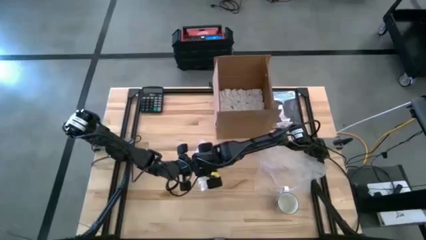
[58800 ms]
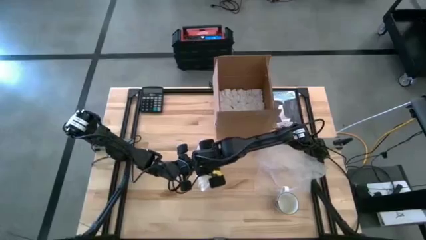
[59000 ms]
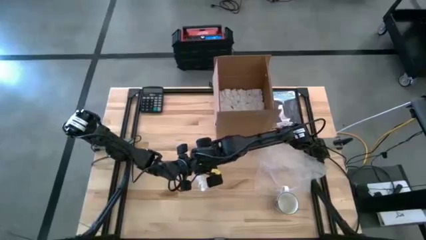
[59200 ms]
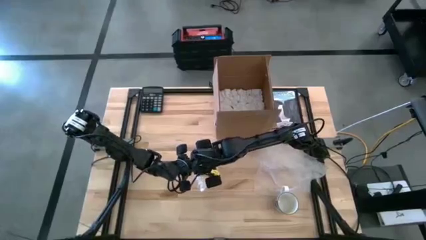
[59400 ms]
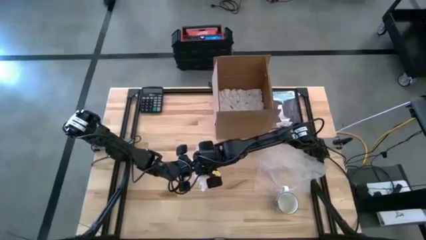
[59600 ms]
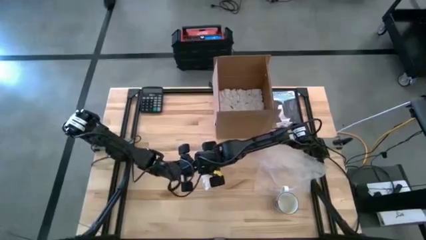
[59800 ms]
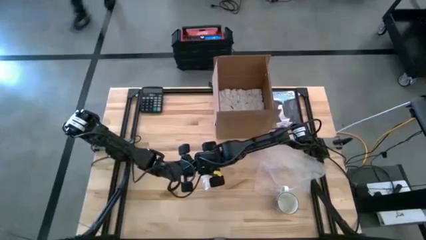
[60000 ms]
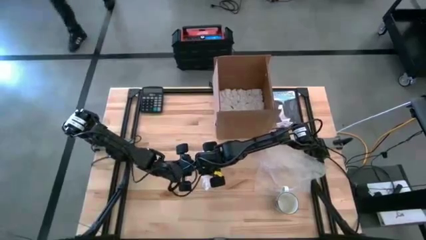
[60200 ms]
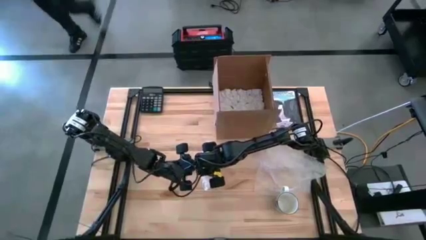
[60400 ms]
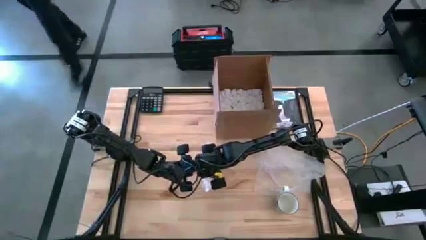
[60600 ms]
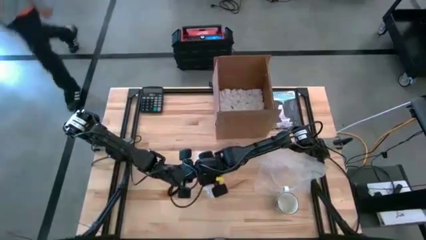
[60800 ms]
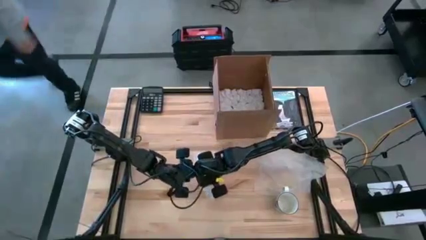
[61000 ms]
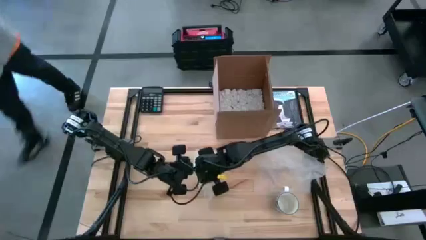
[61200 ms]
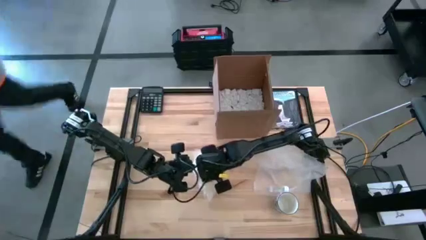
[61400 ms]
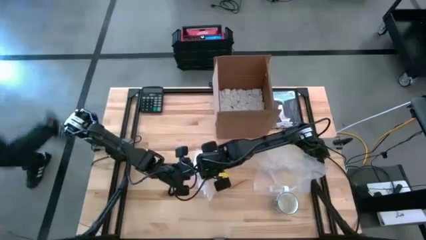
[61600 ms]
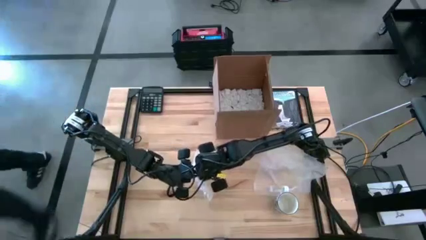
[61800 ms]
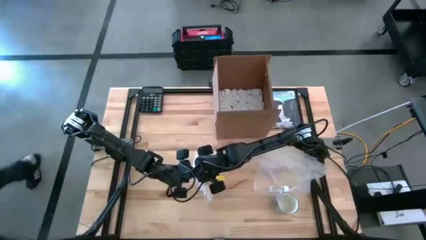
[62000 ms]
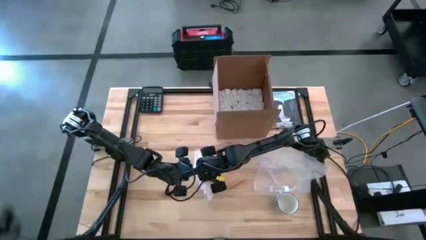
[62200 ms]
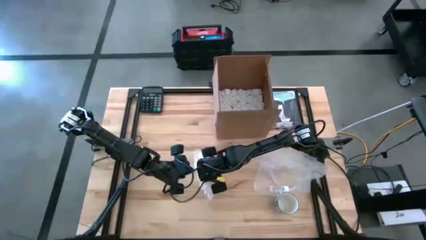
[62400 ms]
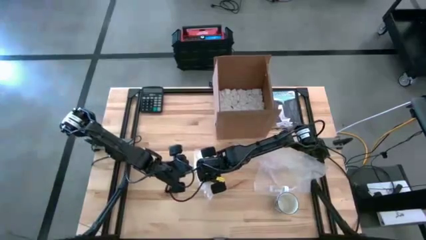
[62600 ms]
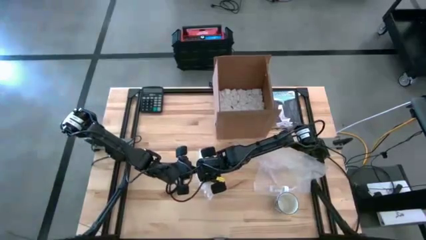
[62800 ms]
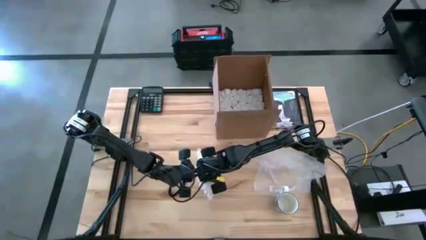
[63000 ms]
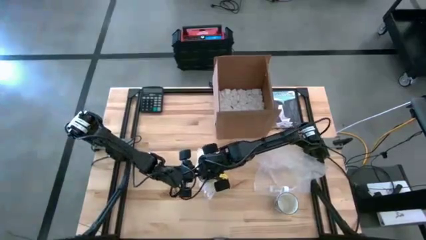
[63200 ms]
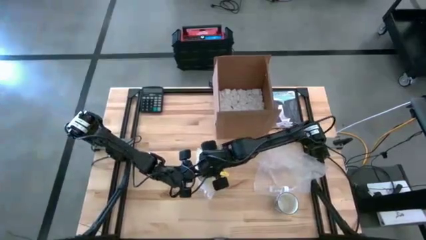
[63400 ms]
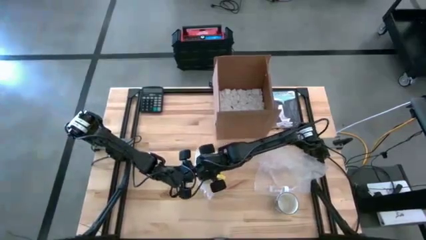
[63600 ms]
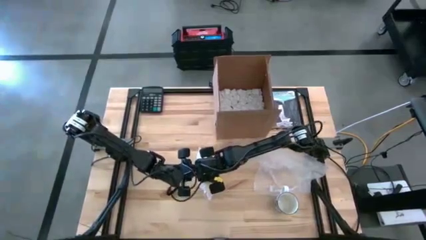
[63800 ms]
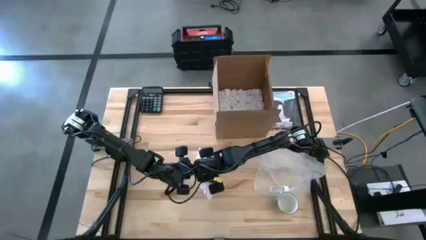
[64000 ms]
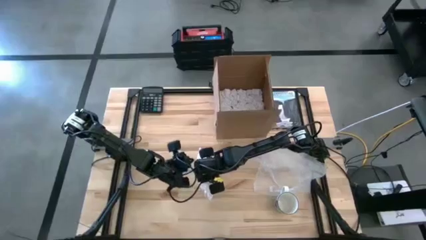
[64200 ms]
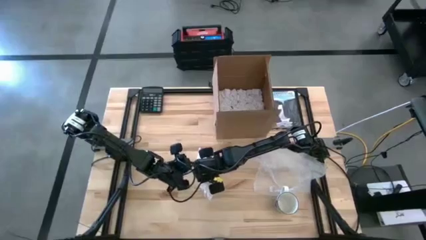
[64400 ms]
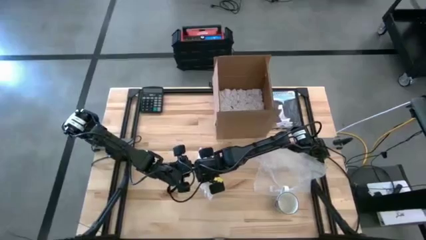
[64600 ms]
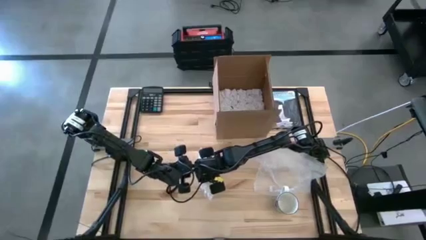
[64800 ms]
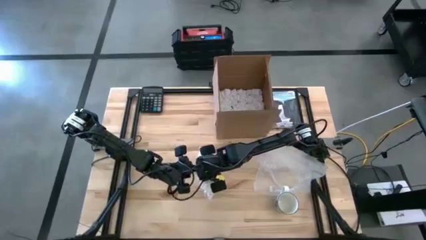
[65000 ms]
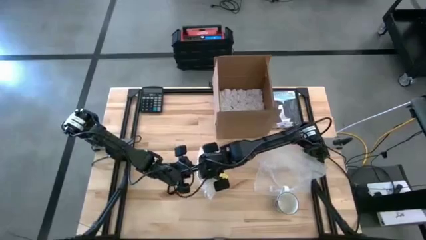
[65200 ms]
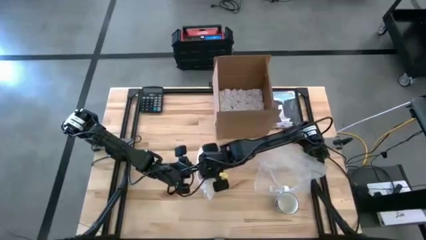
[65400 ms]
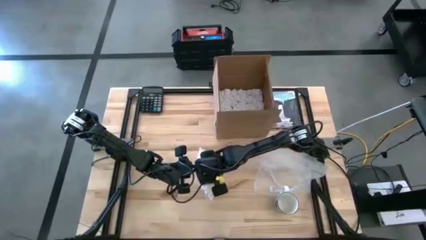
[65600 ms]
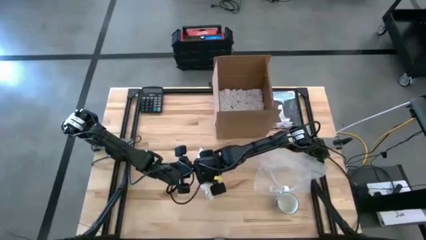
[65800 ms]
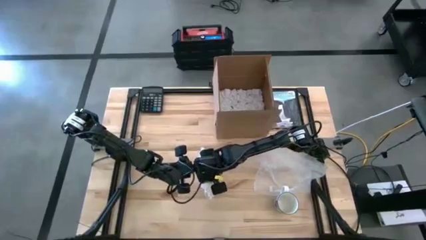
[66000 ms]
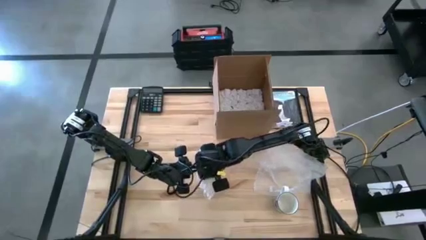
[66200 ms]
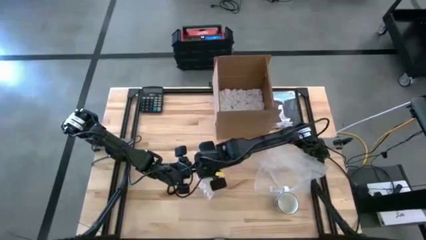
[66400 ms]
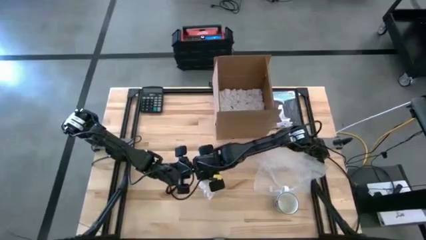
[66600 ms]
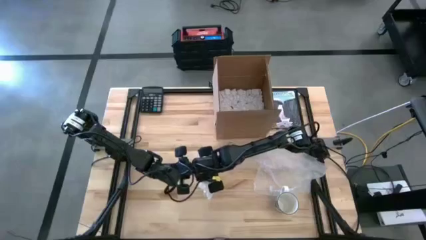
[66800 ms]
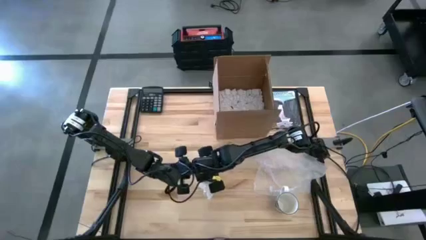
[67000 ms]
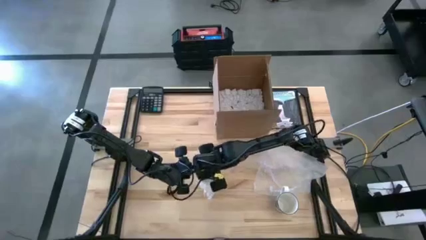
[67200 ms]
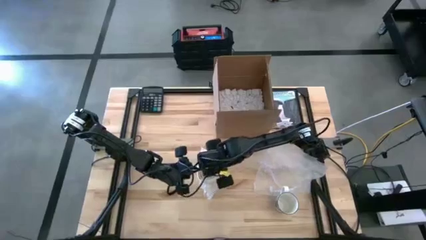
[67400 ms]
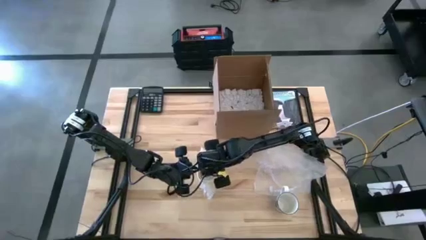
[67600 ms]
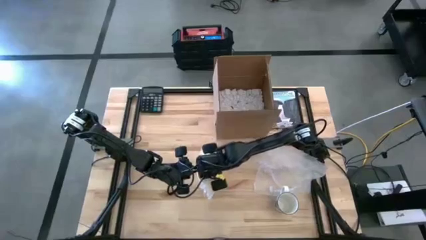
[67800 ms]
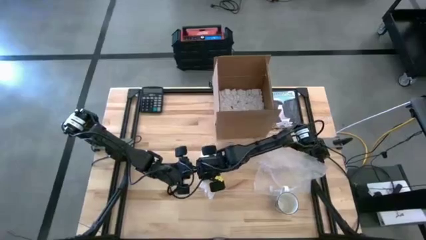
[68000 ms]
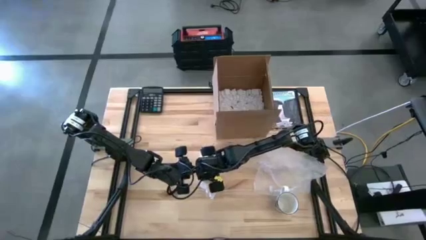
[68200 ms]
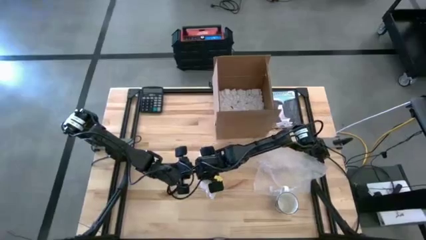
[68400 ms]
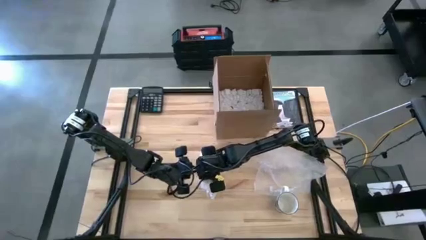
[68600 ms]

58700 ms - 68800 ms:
Task: wrap mug
Wrap the yellow mug with the left transparent bubble wrap

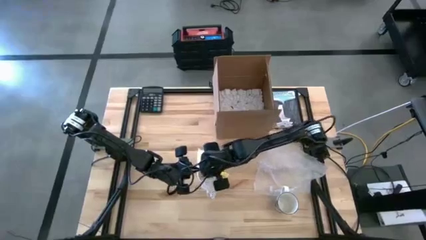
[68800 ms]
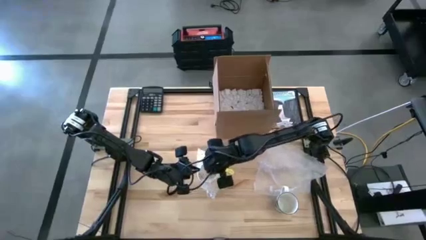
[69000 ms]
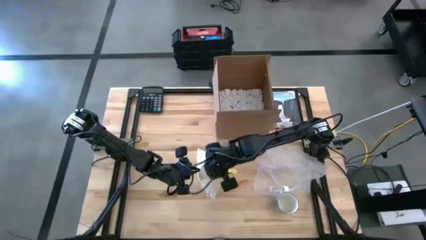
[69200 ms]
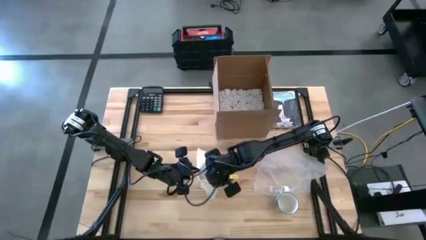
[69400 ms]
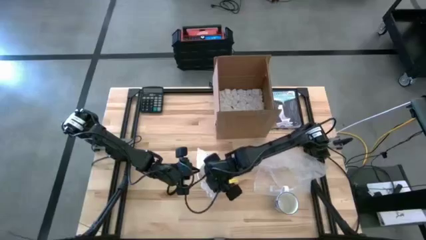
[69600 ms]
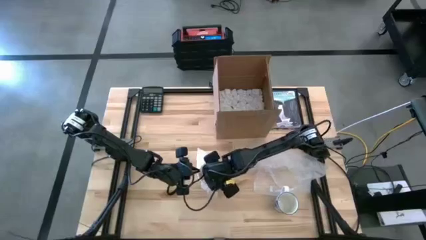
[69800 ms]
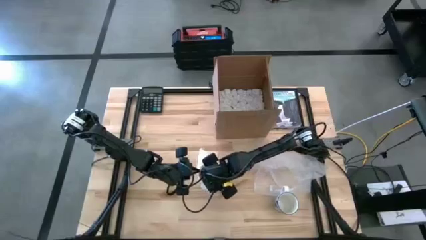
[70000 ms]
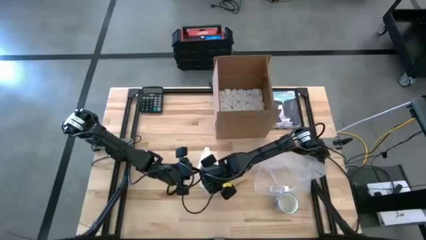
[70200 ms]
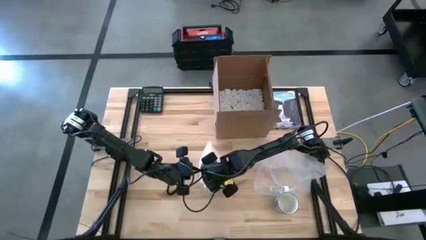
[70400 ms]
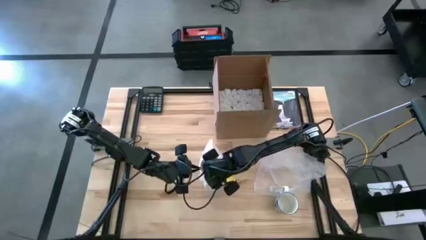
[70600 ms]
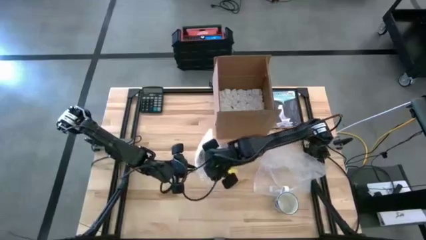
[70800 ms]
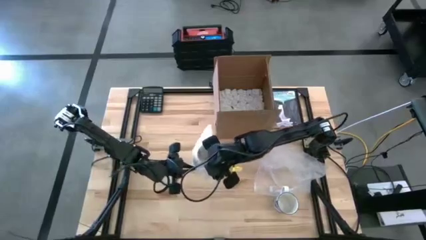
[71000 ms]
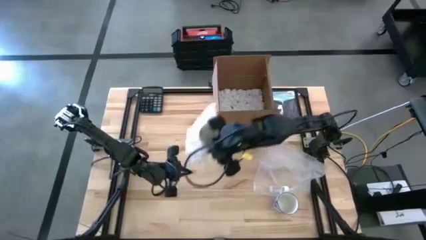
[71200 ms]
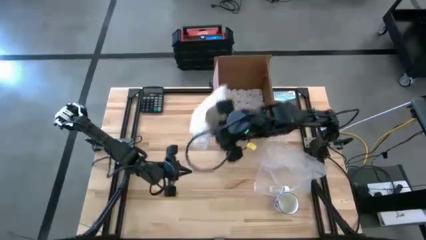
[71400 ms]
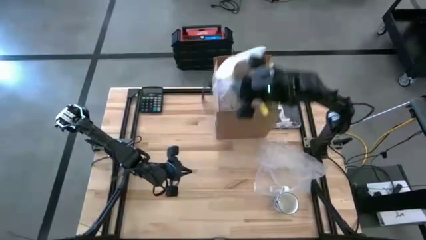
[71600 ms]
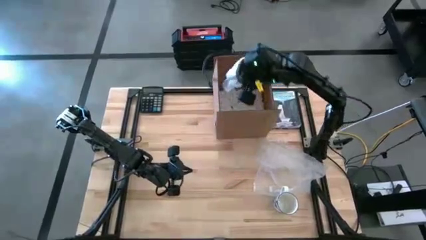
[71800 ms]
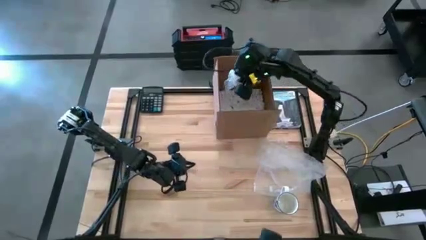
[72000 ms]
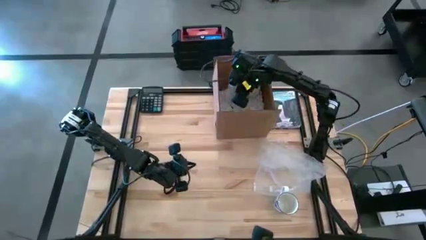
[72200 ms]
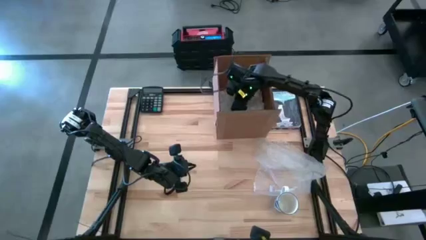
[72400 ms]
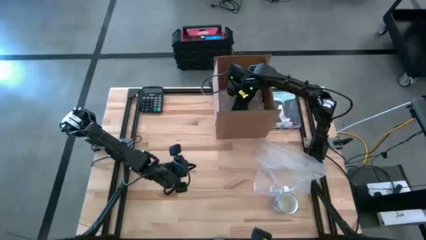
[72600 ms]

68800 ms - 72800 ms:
Put the wrapped yellow mug into the brown cardboard box
